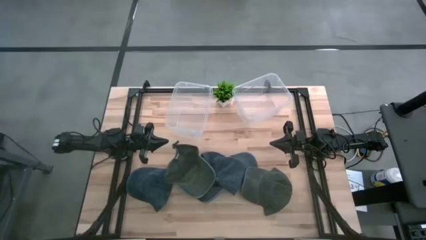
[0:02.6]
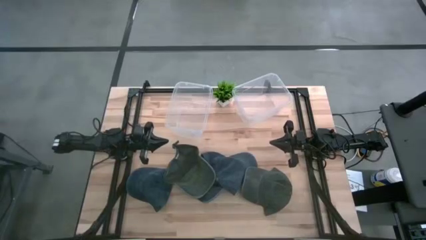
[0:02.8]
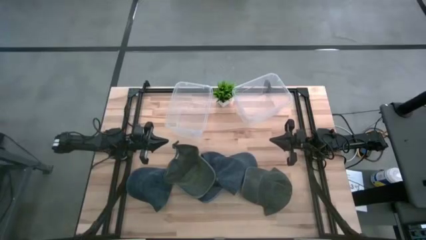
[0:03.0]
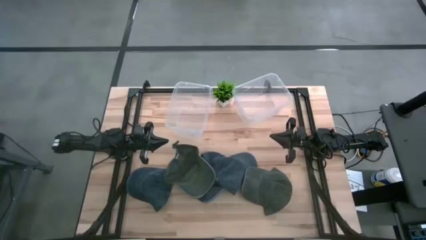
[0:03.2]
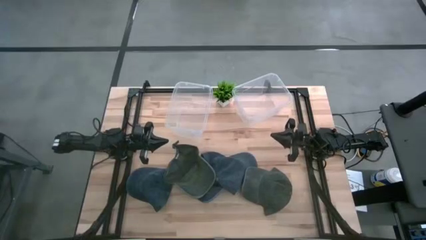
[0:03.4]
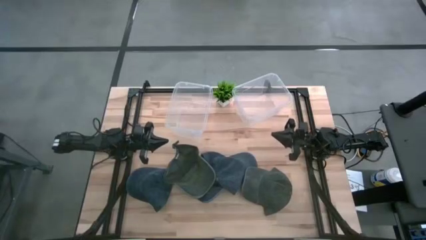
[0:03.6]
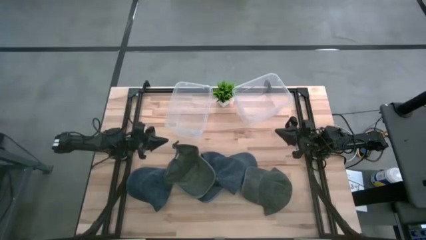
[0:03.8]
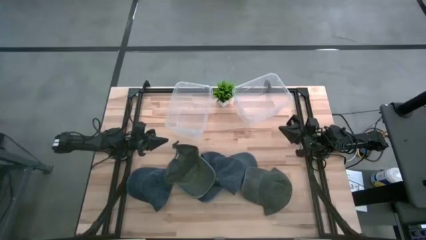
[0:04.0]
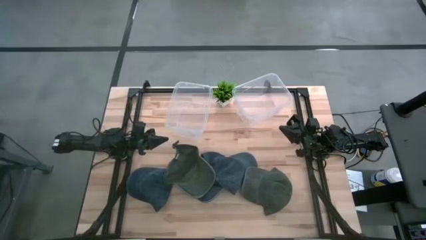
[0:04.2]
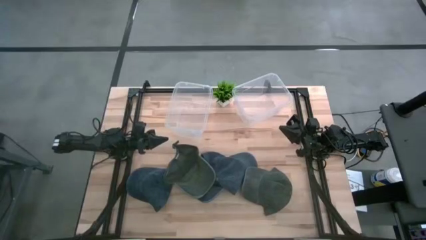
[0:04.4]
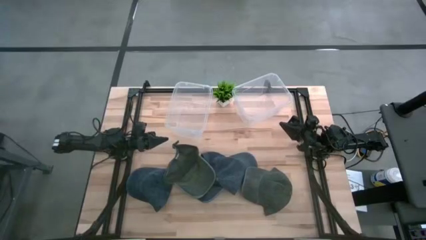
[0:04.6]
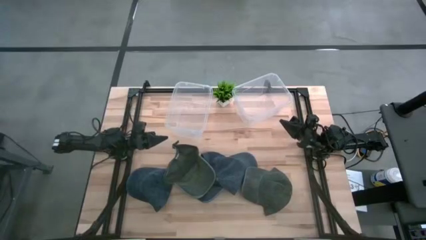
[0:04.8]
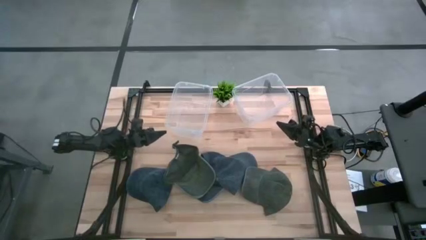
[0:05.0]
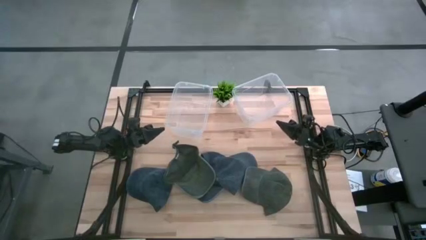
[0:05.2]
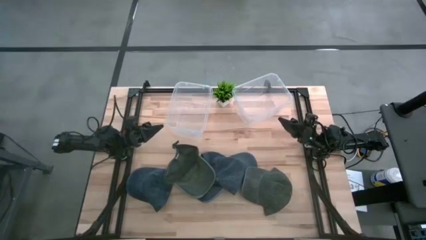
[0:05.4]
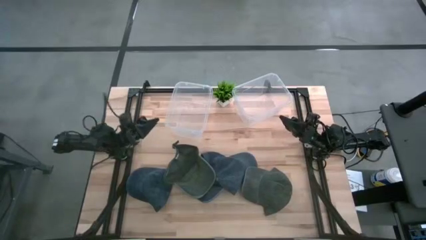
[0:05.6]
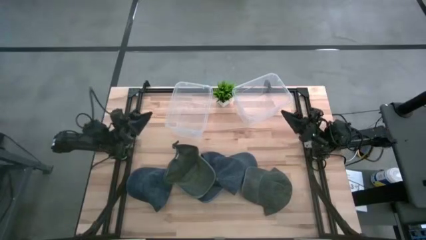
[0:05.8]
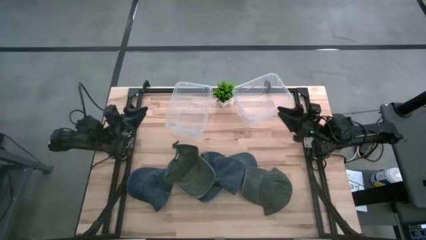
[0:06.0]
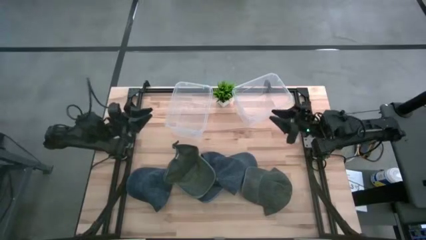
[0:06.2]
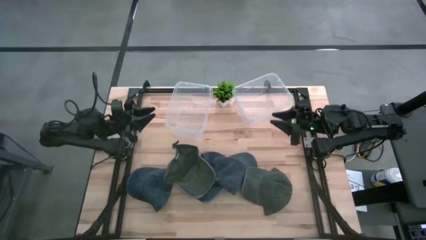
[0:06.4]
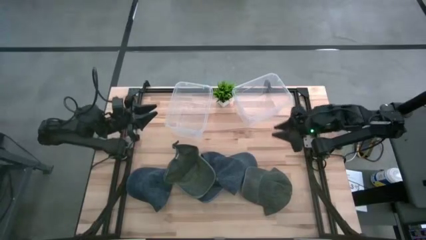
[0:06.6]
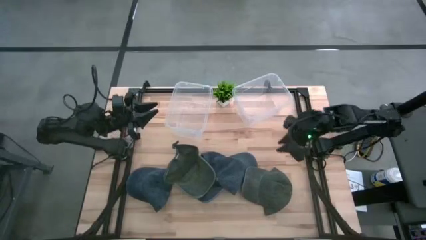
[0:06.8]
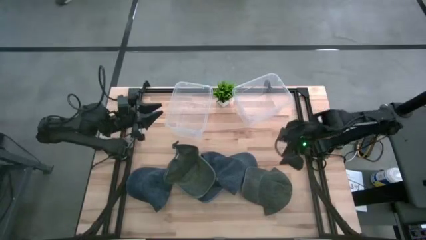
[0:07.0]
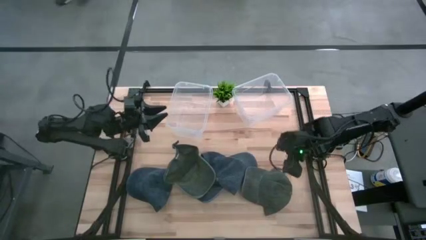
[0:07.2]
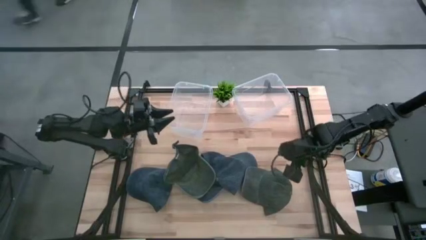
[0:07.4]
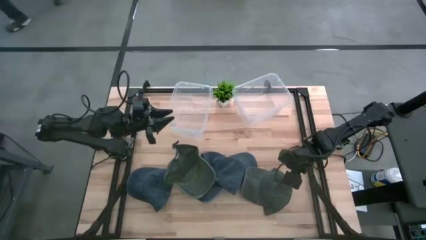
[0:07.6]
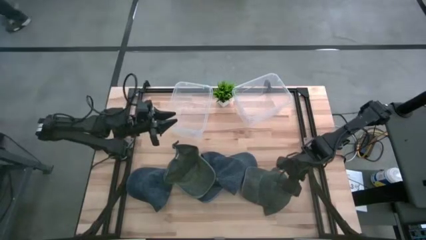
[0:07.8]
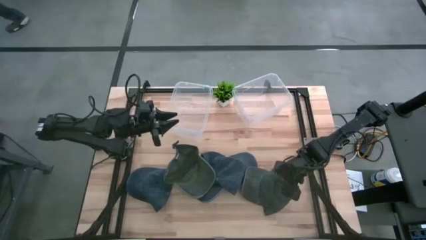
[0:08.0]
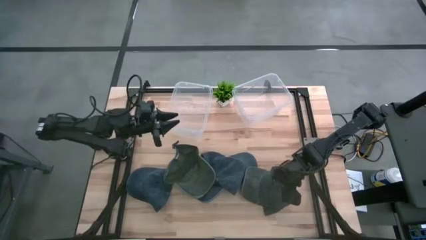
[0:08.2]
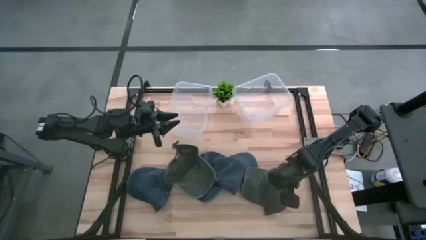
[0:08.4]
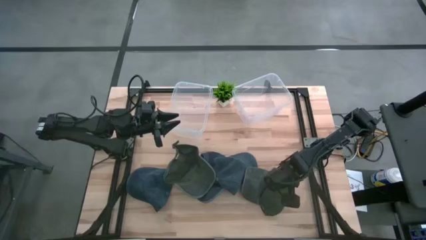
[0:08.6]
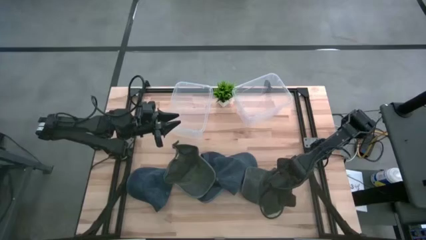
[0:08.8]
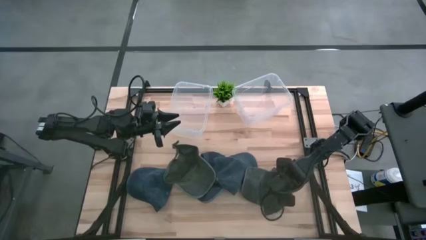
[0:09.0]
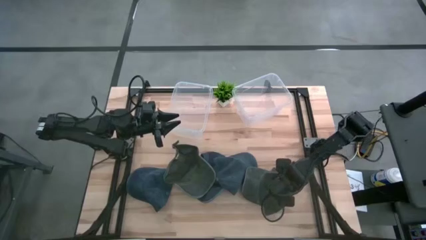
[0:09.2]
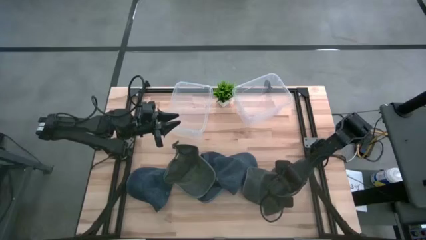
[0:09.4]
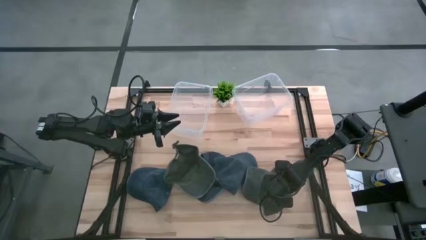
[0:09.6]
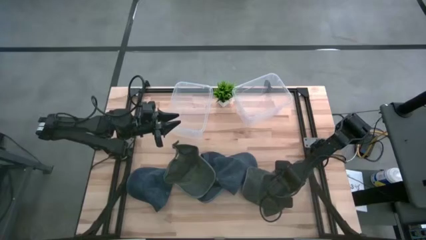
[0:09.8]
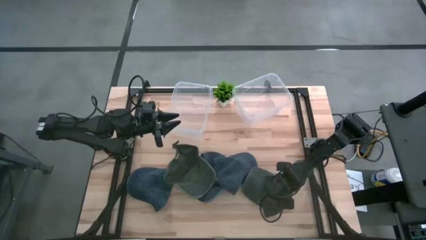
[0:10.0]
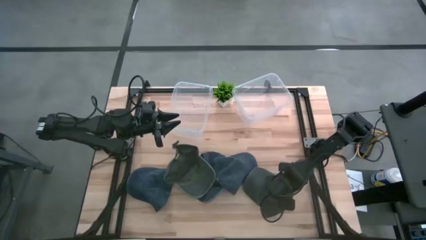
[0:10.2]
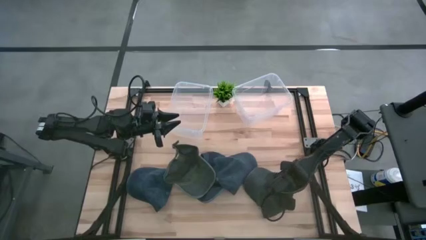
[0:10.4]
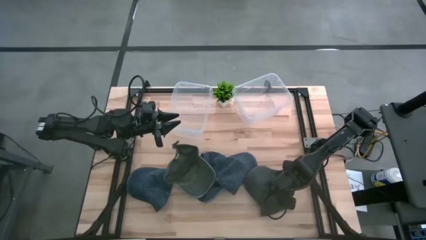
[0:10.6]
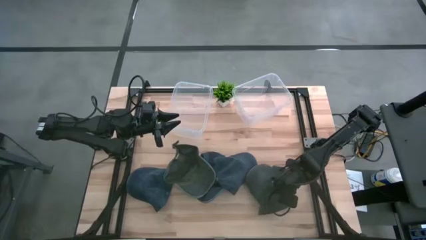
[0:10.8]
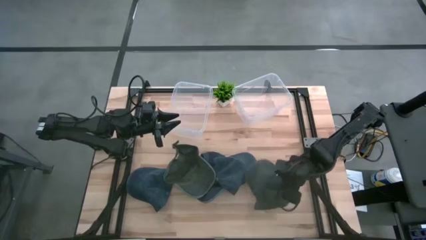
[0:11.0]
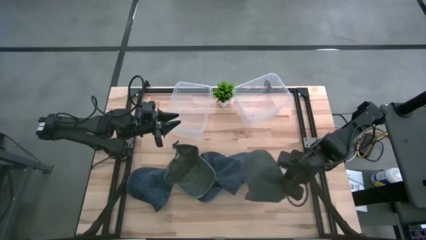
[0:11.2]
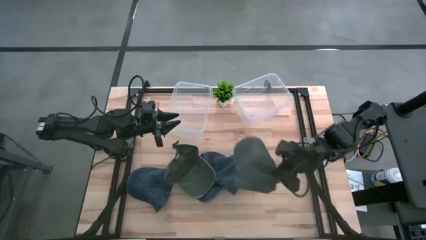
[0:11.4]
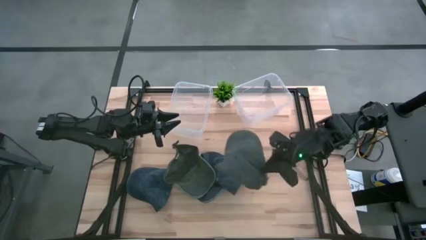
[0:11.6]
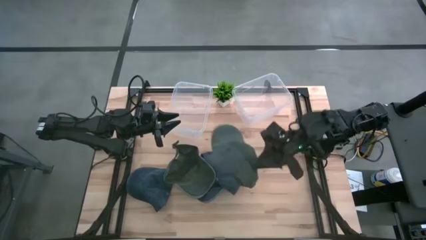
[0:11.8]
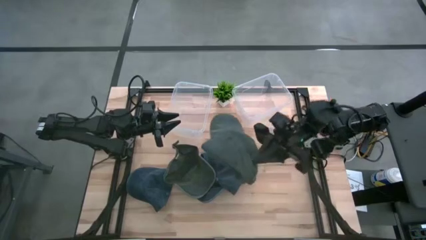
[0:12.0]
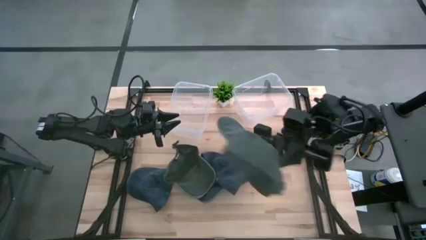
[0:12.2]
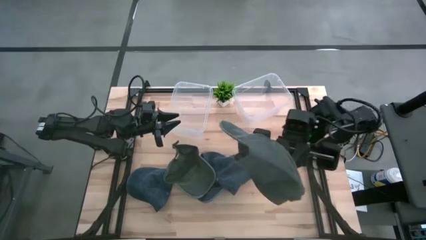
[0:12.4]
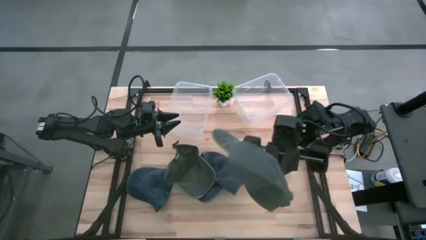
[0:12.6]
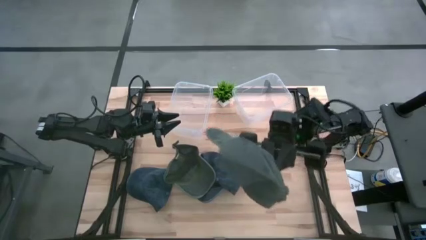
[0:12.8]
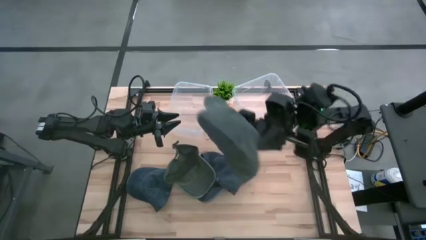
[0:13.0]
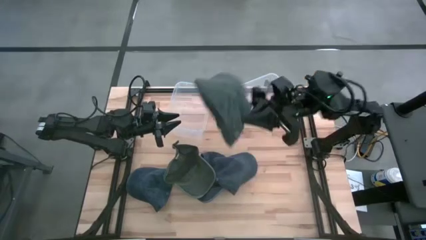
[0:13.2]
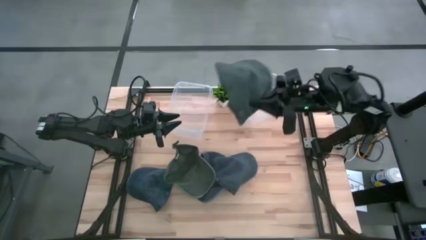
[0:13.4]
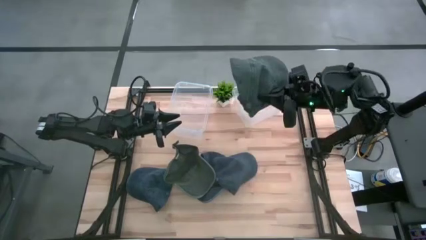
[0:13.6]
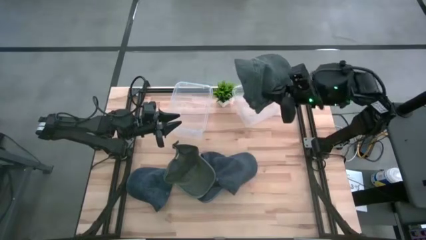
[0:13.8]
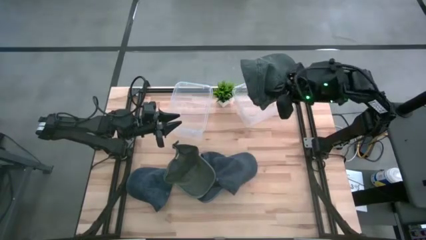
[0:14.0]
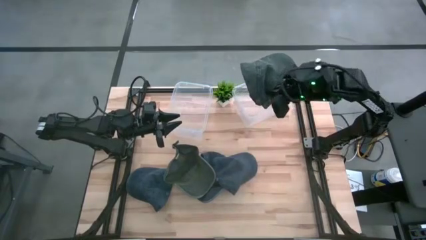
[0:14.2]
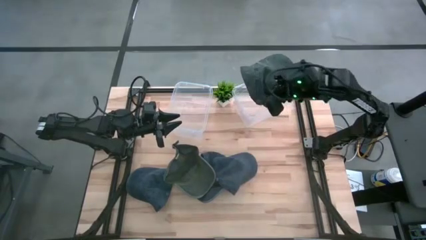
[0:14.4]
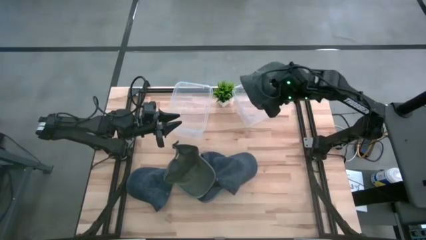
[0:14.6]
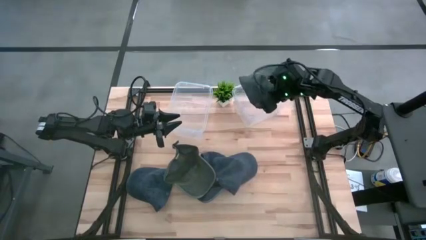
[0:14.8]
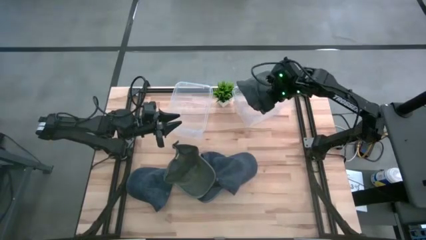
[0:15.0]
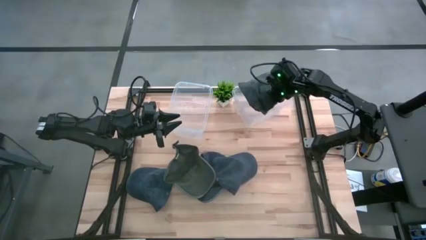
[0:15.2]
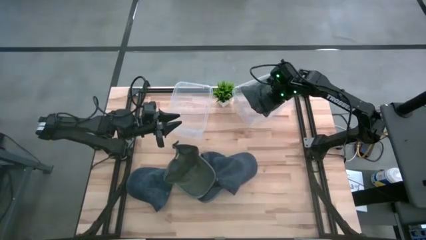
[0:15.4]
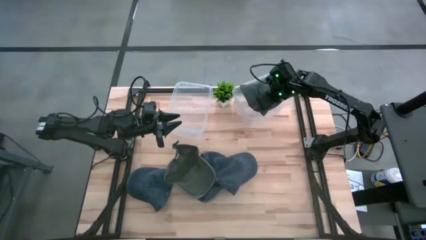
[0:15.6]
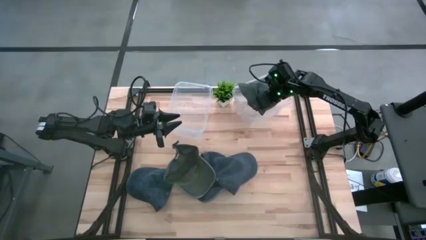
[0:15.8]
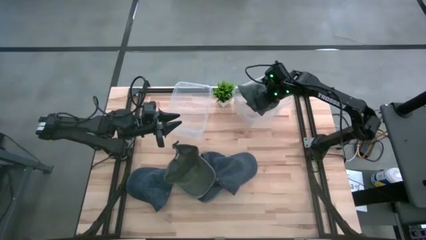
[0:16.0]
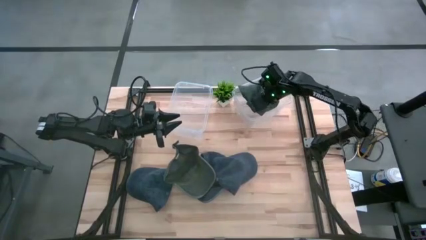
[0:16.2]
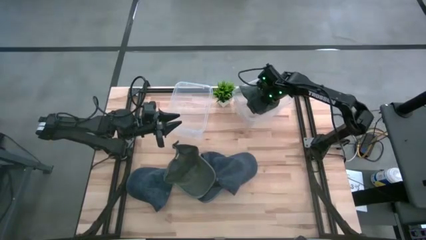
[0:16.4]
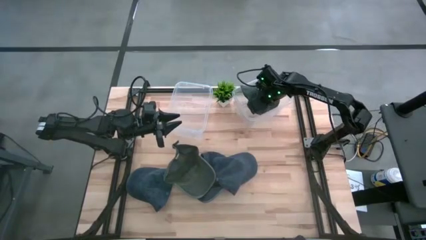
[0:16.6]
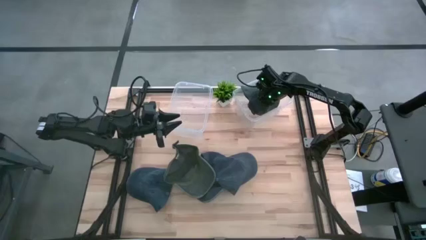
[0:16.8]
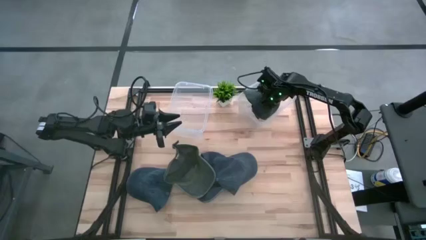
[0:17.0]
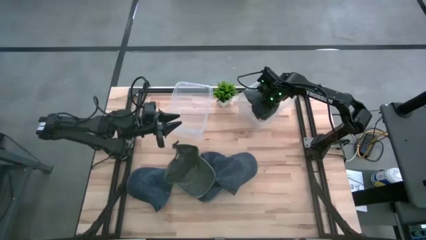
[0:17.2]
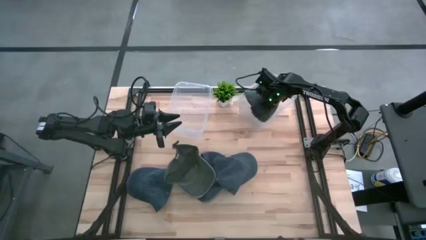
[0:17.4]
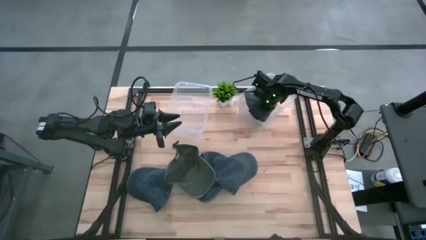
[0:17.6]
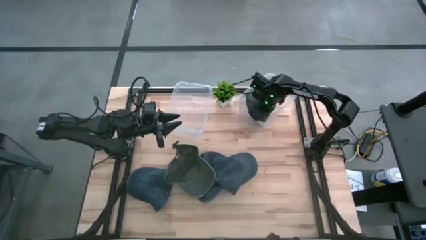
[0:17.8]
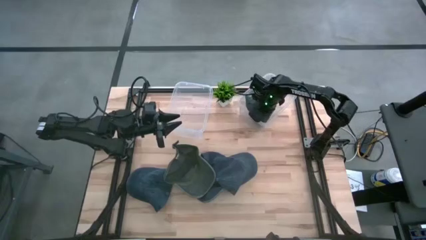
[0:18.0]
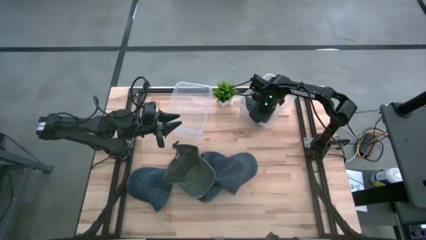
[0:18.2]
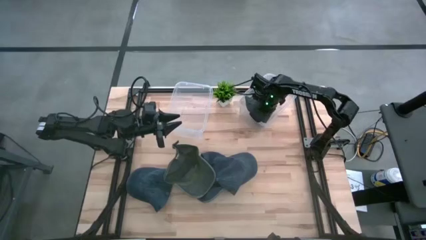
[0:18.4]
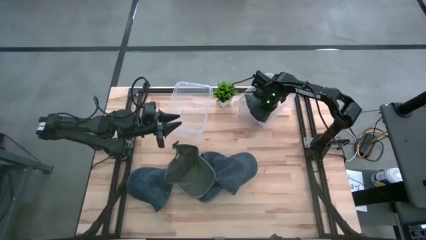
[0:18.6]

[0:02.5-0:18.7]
Task: Pick & Place hat
Put the right green cap in the right transparent bin
